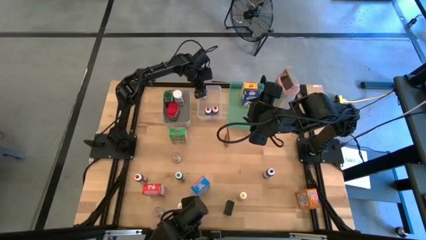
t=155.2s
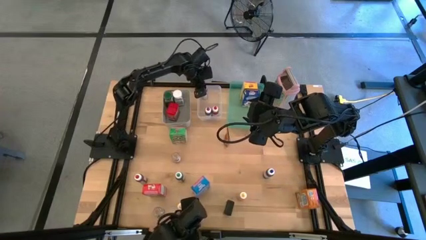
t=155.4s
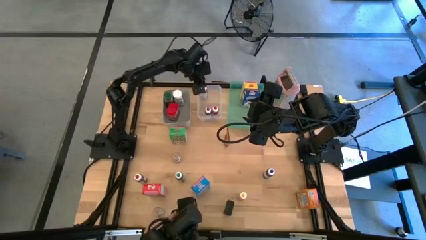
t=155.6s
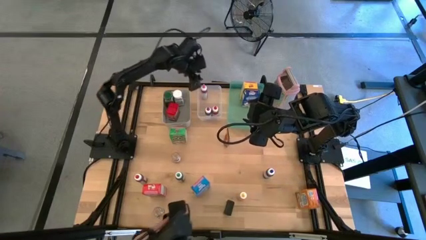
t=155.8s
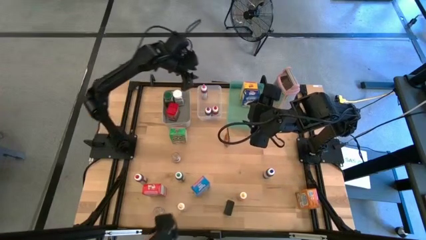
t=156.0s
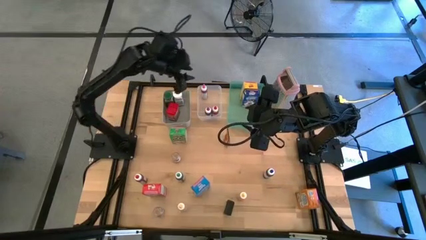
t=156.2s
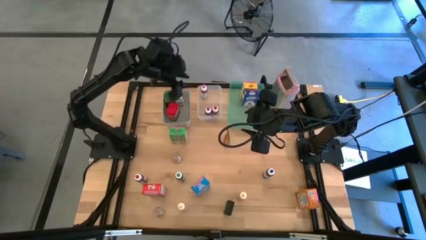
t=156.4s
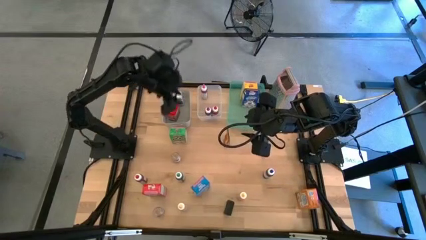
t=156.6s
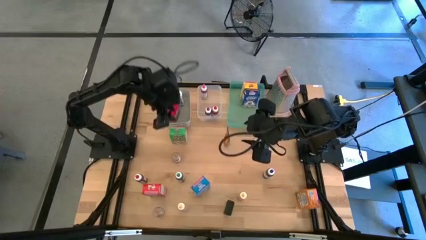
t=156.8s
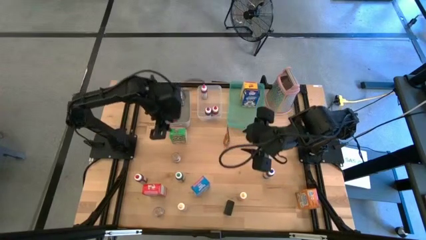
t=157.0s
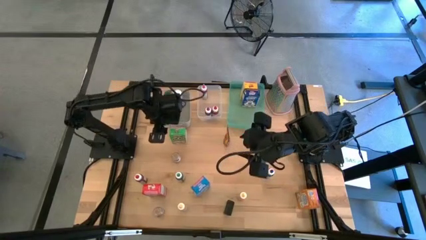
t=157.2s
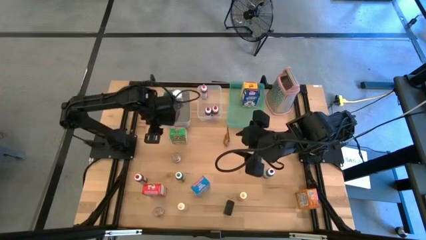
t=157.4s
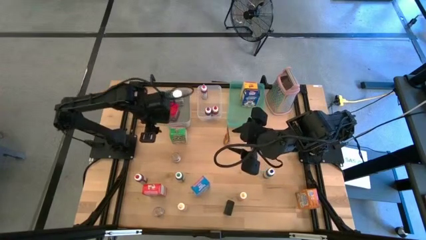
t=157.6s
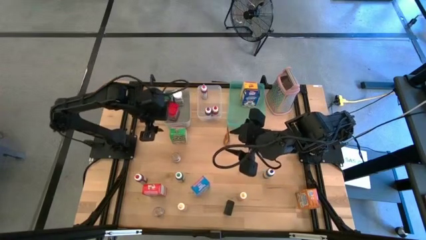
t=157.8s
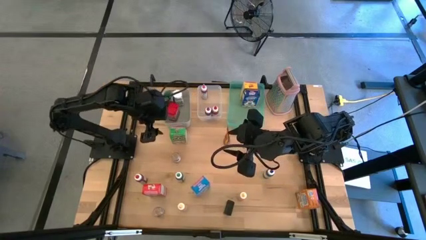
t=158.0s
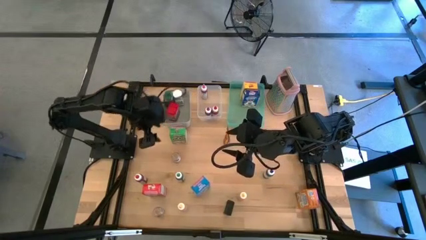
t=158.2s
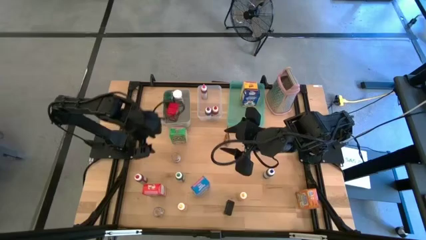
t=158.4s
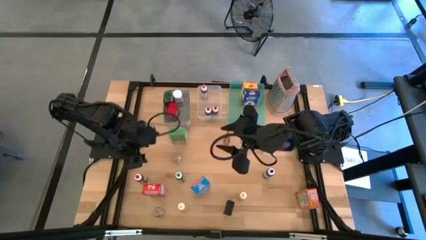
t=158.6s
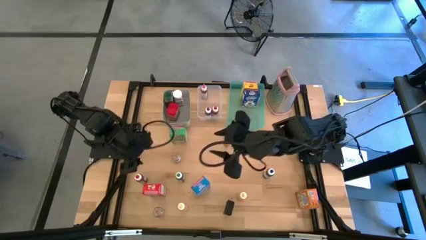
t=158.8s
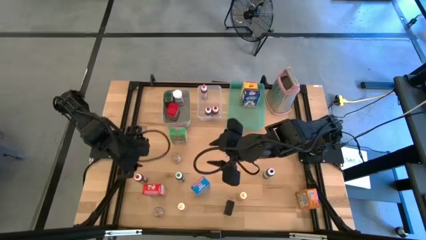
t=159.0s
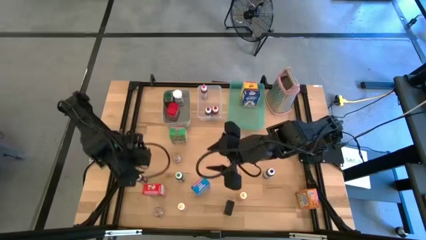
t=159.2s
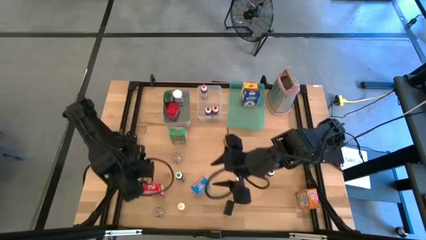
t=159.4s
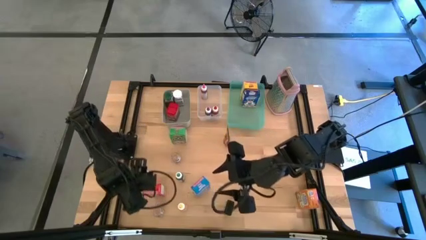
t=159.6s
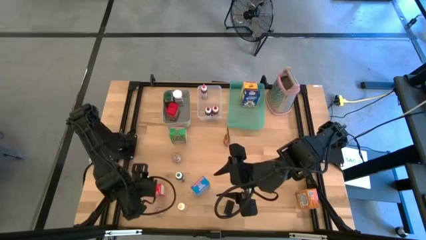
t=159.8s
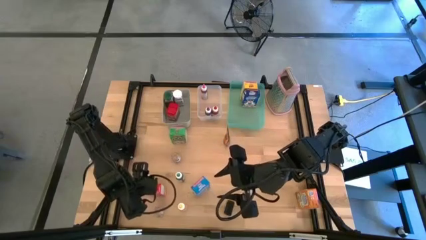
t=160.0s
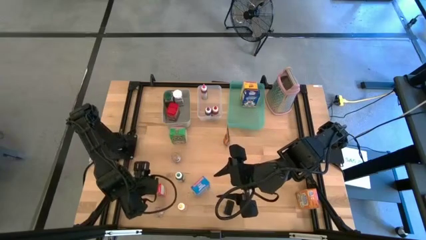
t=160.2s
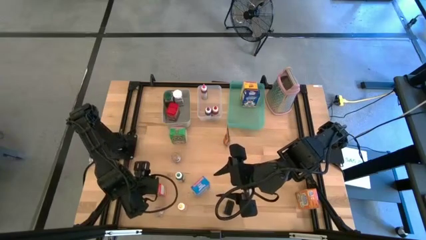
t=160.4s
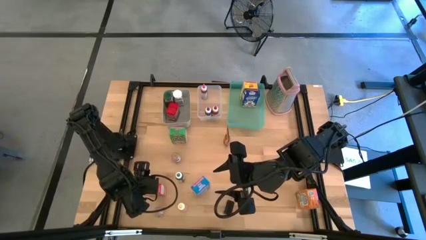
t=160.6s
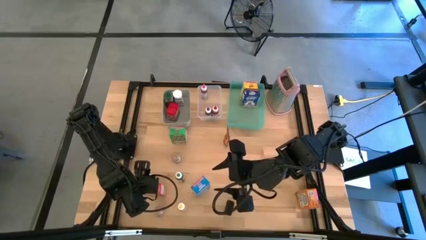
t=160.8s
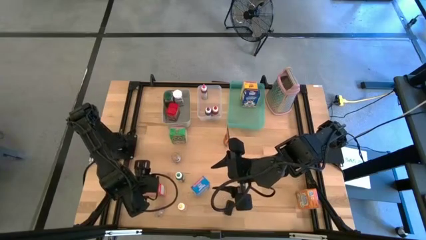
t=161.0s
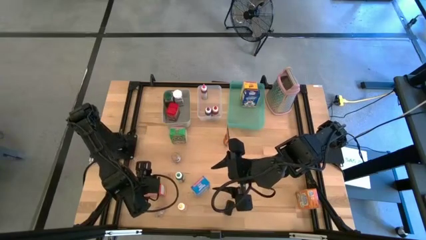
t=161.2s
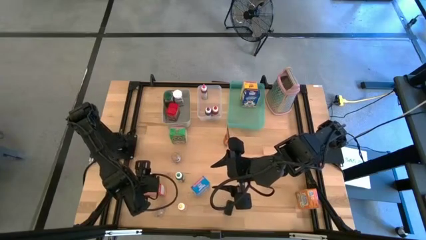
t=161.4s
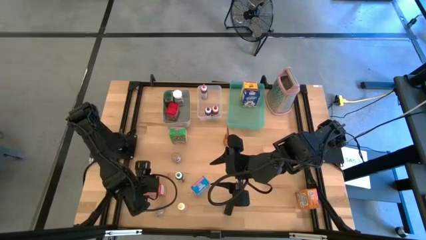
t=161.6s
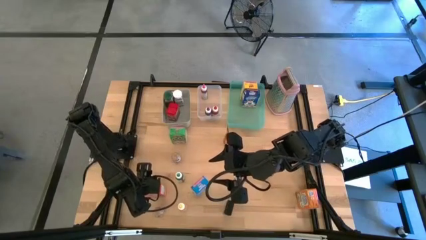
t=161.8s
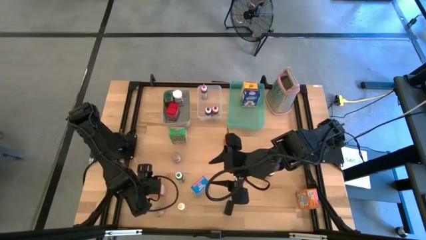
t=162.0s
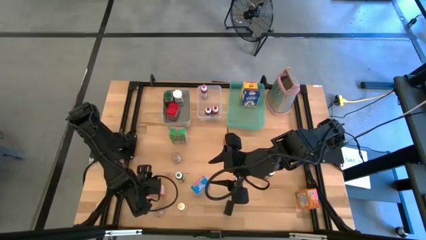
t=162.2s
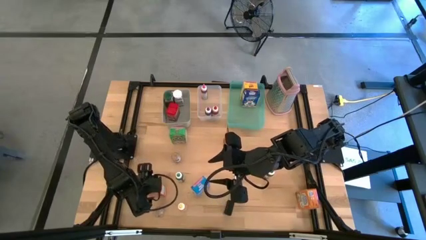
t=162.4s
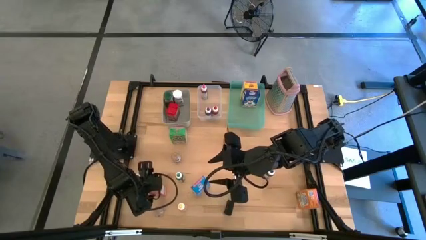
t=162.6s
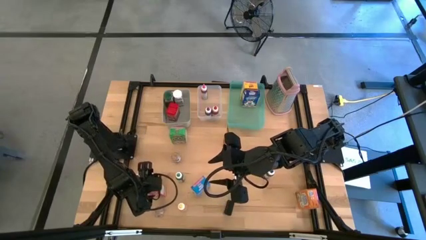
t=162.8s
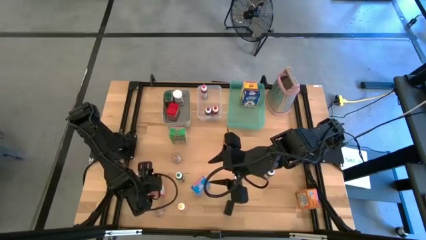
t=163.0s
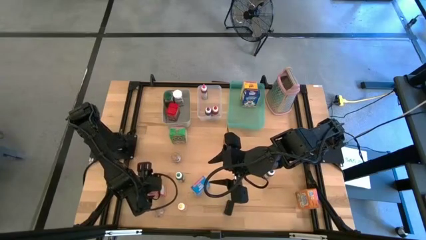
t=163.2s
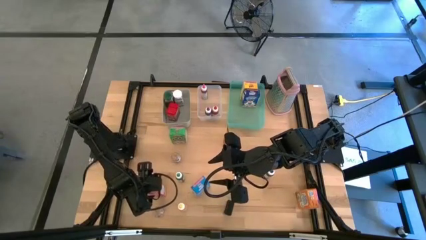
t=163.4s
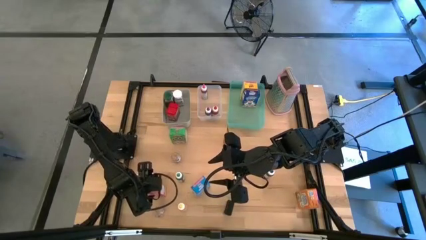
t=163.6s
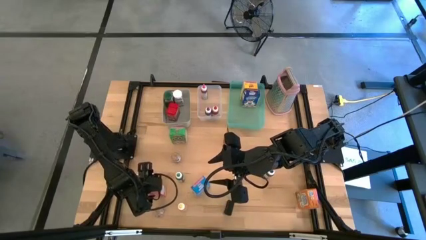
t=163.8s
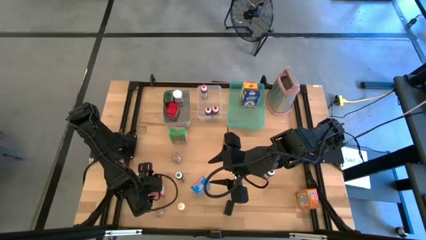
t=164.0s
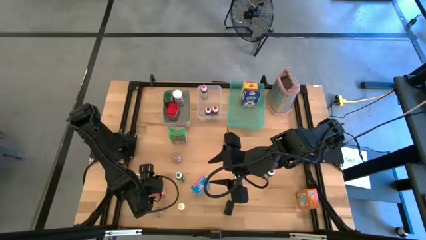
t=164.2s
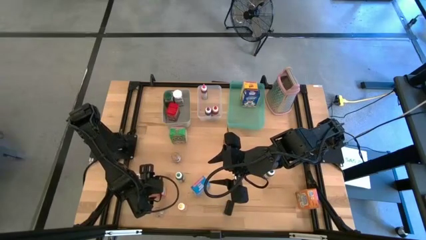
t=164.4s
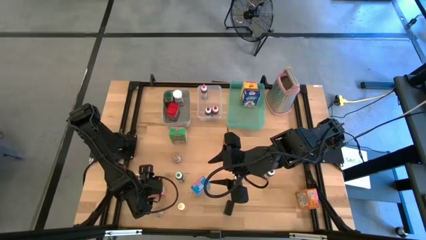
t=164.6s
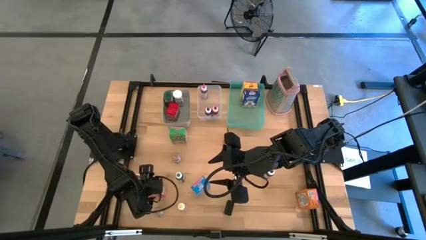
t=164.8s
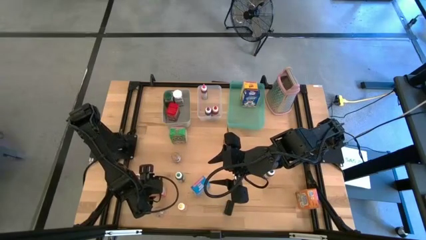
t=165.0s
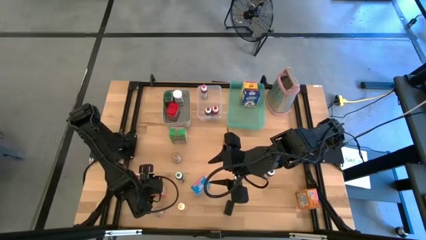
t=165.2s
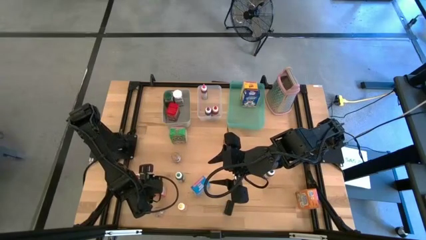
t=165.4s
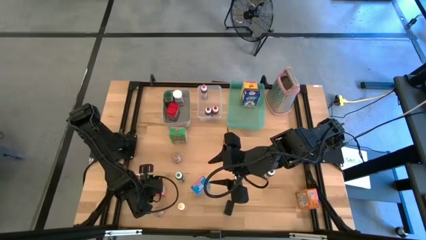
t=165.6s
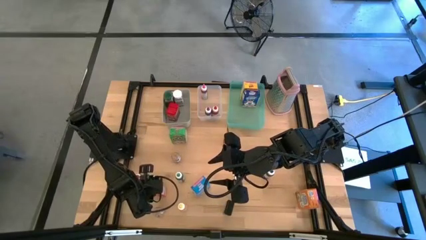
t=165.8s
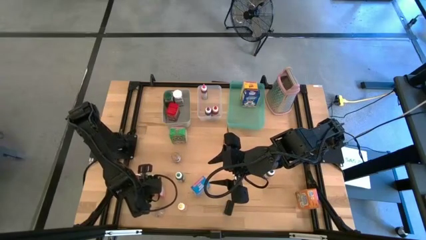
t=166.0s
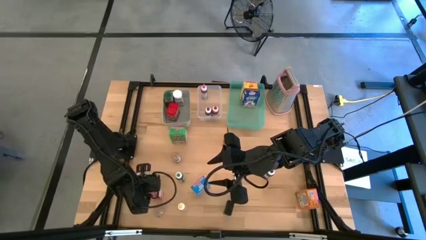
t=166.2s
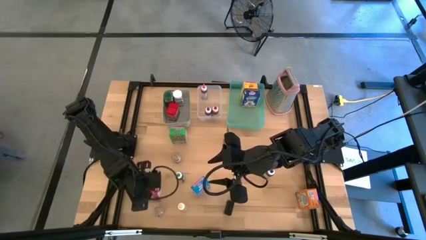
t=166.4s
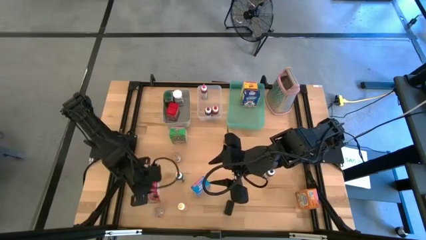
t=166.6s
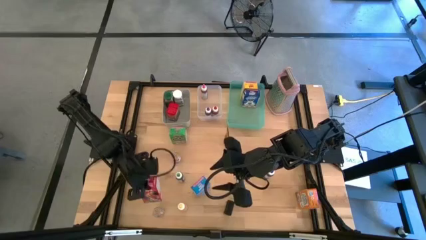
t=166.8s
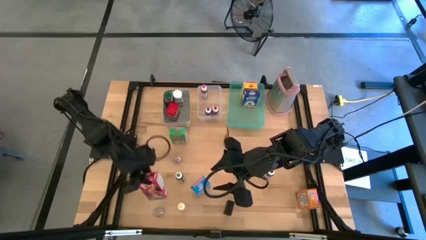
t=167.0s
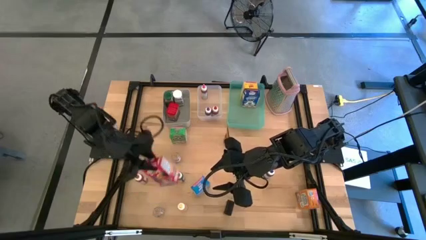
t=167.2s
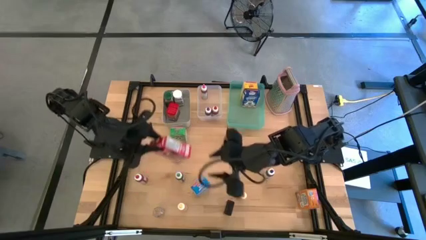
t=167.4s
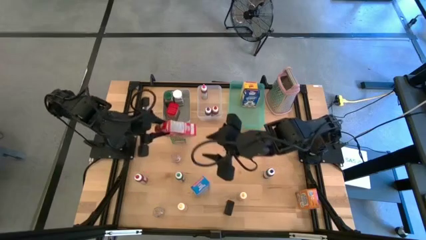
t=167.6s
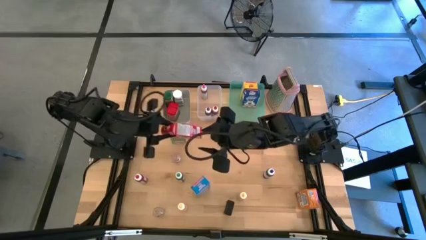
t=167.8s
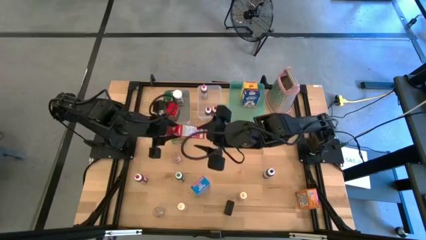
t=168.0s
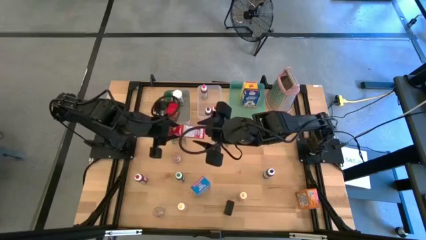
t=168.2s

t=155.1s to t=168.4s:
Task: Pick & Place Kitchen Items
Put the red cereal box into the green bin
